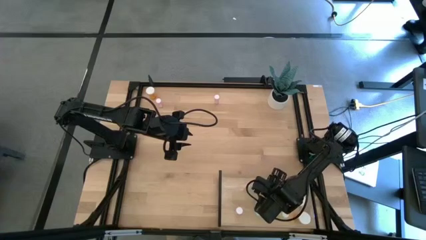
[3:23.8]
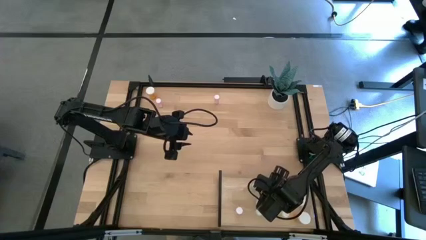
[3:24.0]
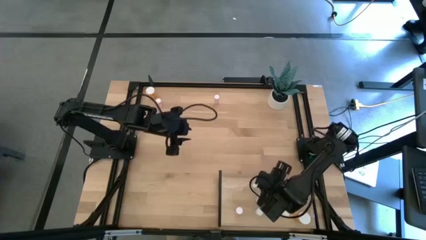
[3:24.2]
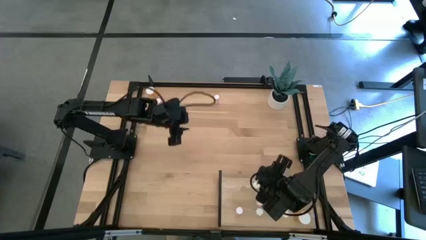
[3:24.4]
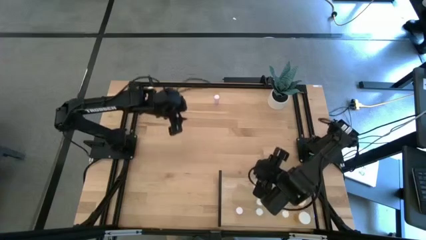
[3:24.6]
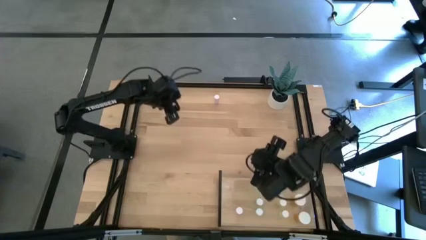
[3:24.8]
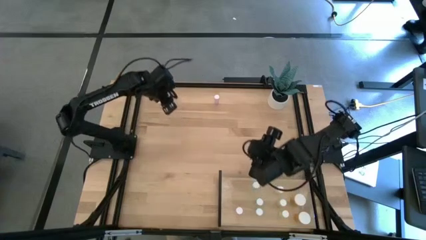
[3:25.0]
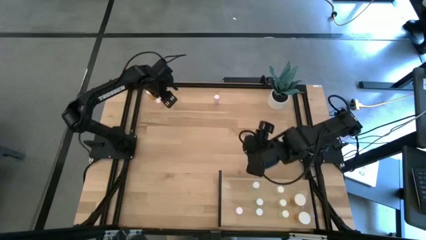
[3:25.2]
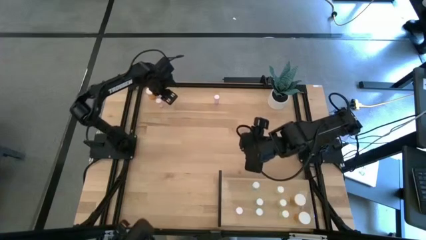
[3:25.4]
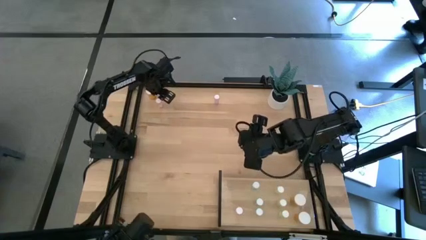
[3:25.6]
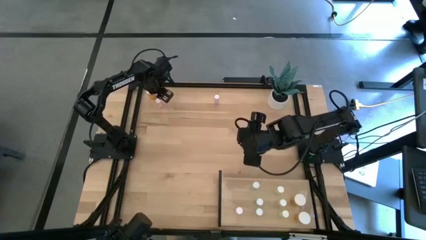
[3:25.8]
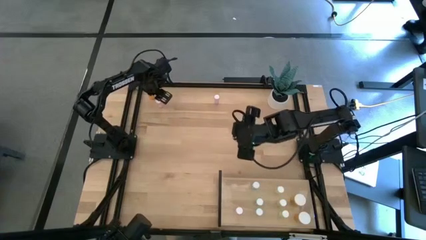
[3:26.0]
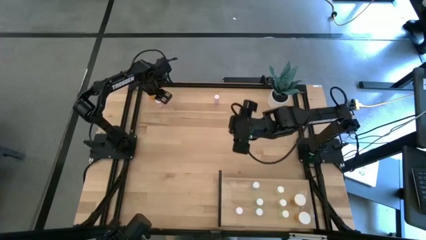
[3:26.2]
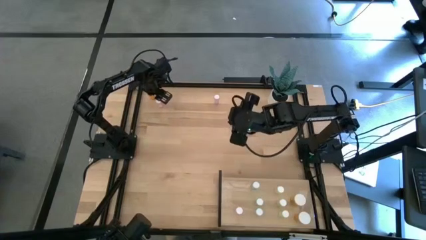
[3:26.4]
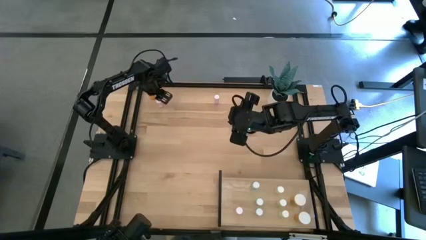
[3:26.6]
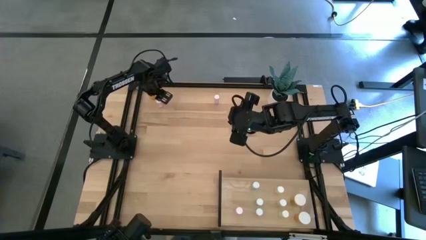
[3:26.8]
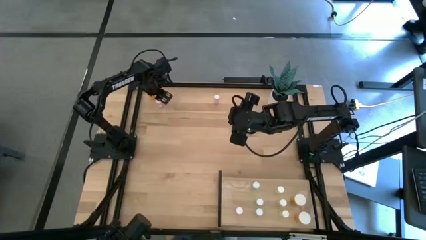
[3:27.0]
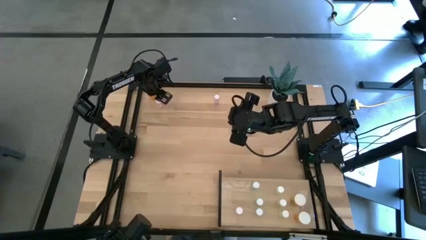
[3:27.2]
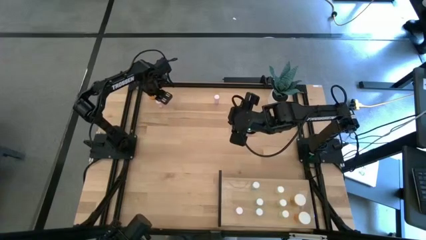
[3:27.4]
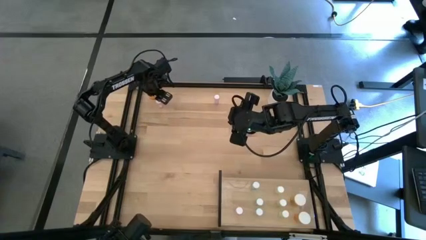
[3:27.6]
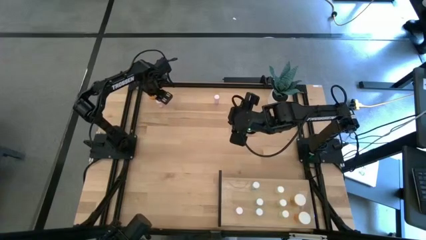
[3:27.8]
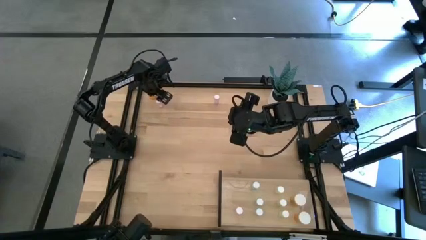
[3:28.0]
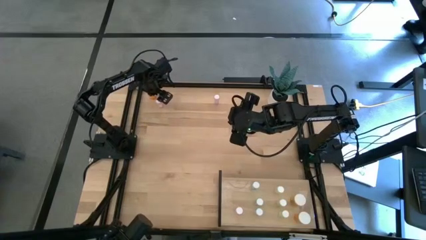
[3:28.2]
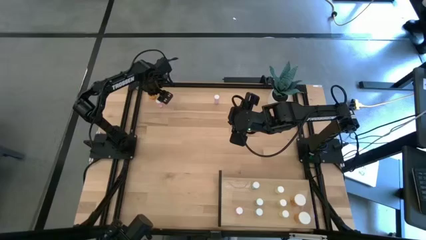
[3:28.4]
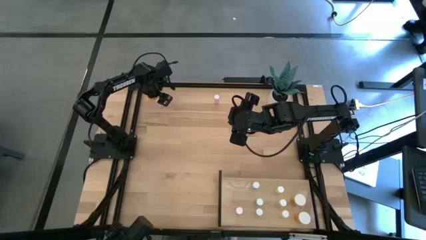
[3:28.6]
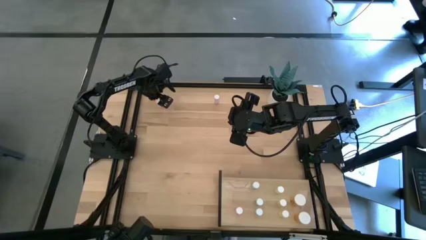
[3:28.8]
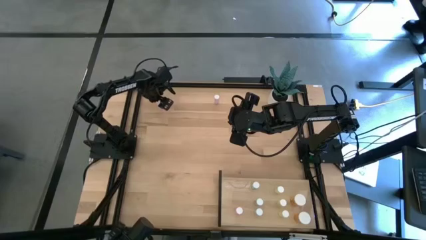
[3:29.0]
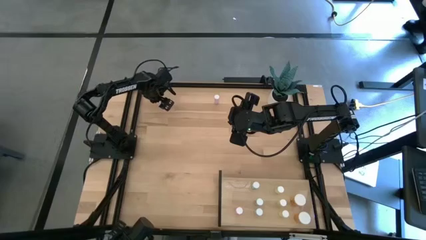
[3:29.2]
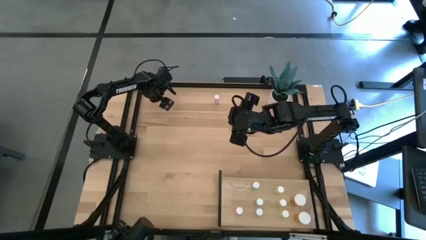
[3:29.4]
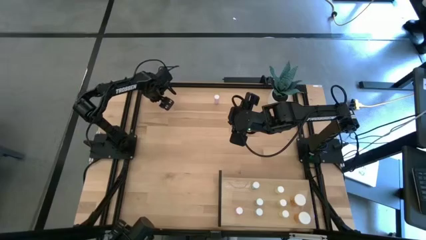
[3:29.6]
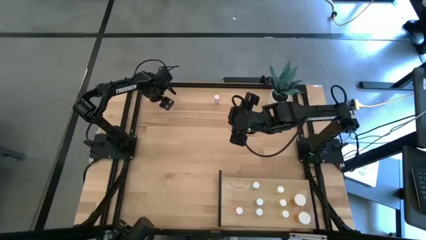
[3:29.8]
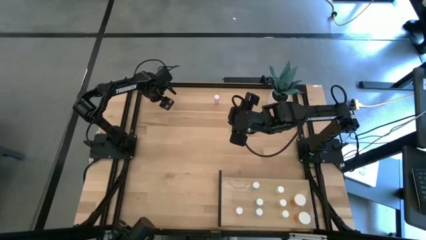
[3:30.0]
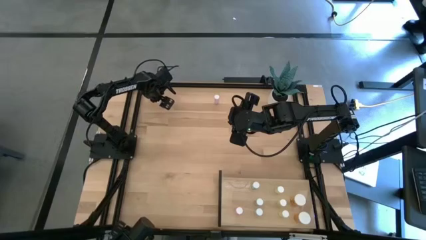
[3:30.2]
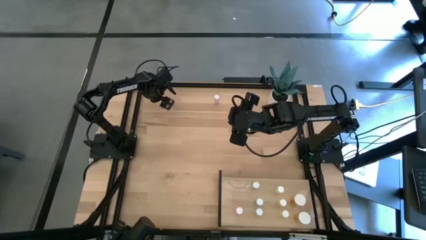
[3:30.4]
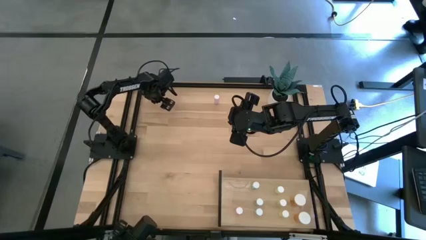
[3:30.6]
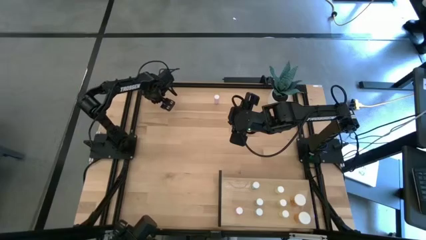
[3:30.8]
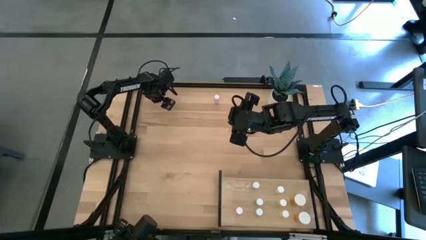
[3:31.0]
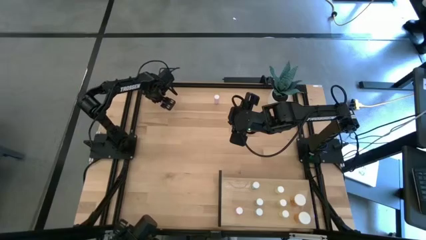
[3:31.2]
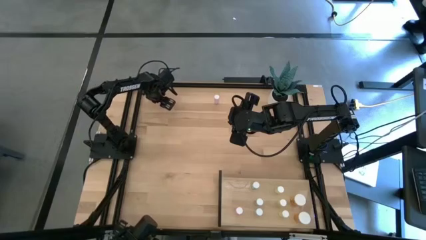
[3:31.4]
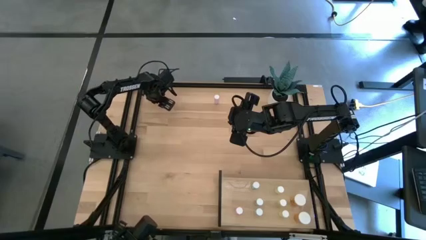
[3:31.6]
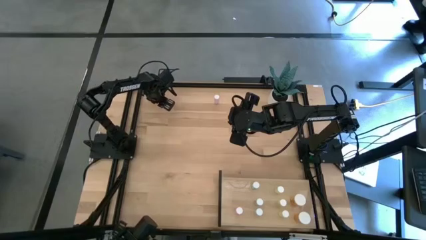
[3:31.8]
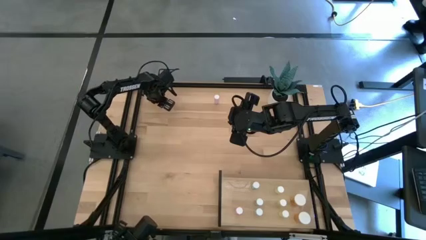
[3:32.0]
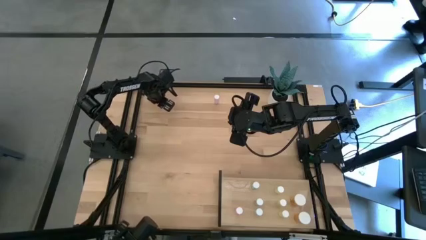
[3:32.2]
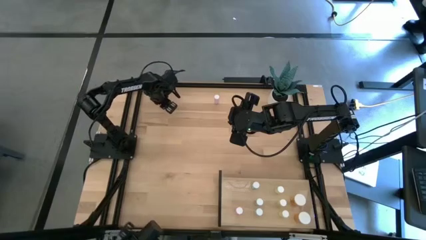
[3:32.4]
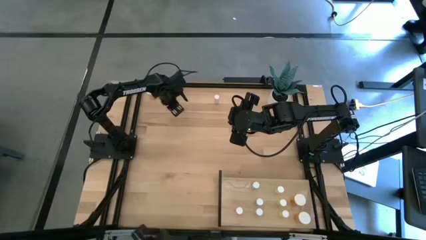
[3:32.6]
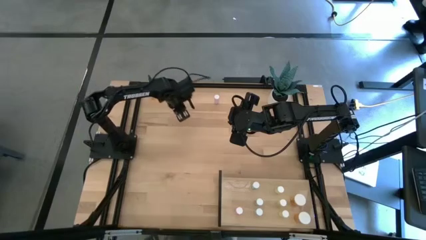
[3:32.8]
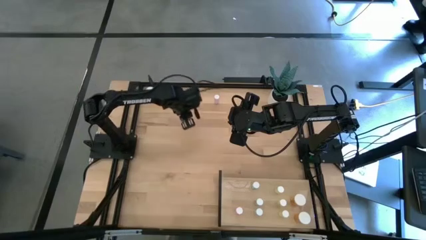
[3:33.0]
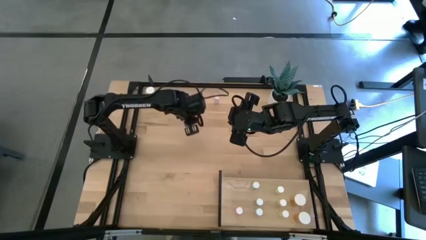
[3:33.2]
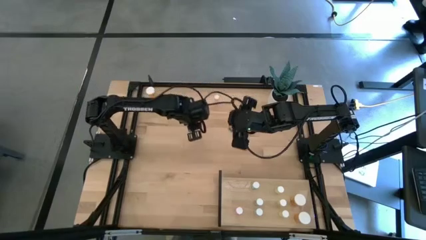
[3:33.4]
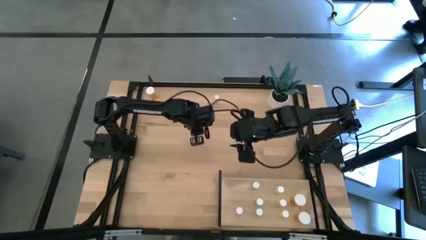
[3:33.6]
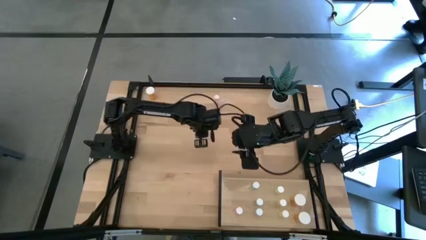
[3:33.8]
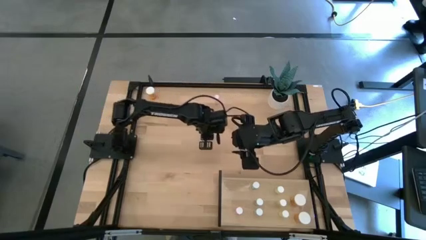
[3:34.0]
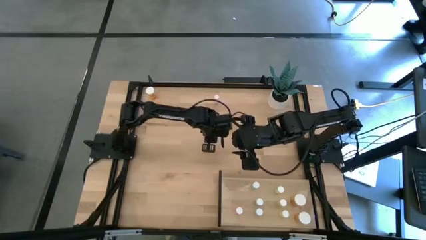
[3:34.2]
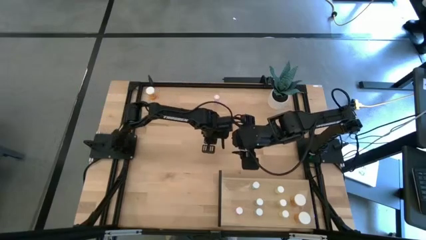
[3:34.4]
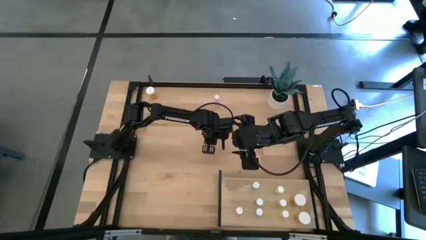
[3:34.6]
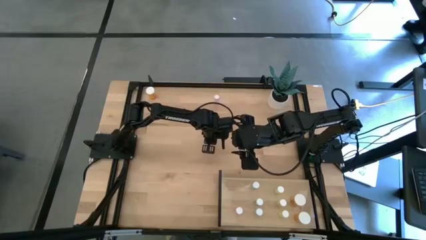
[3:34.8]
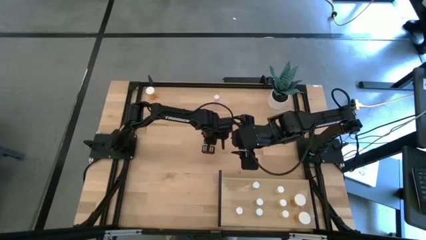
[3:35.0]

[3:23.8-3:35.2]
Task: Pick and place medicine bottles onto shelf by color
Put the left pink pill bottle on the shelf aligned with the other pink pill bottle

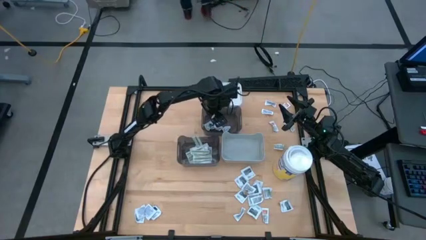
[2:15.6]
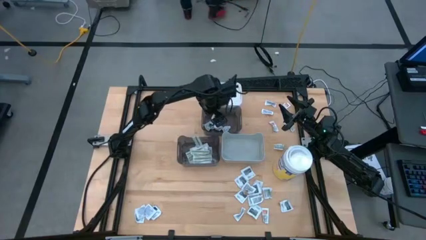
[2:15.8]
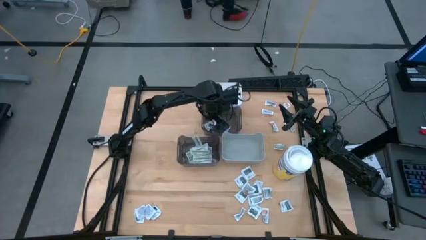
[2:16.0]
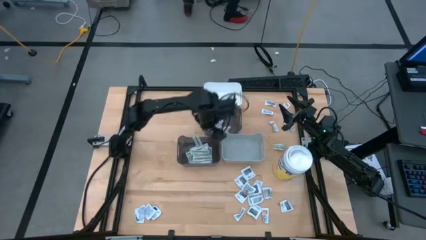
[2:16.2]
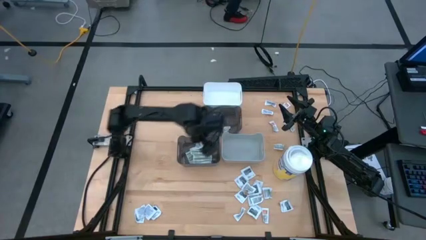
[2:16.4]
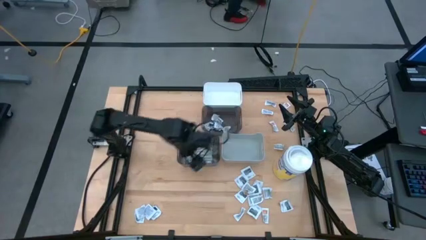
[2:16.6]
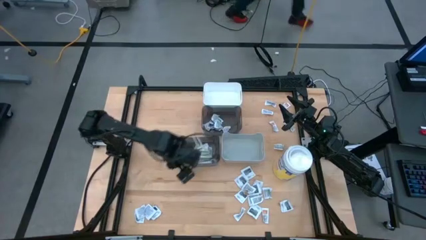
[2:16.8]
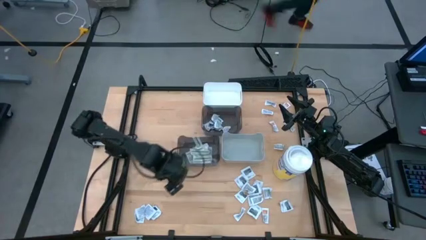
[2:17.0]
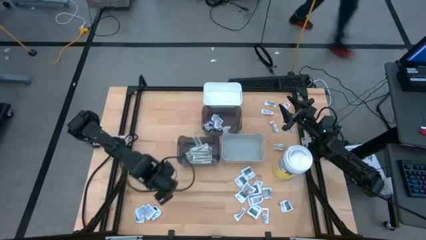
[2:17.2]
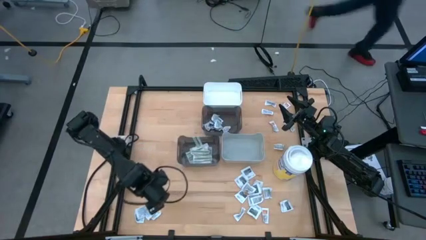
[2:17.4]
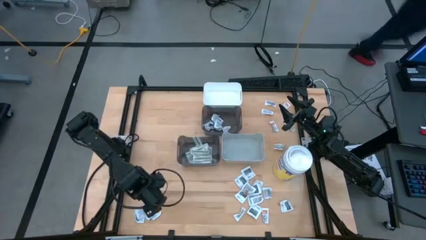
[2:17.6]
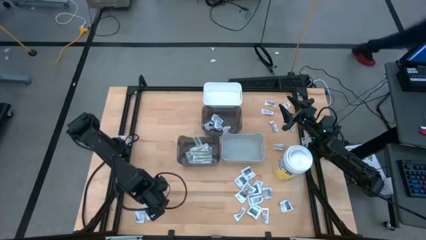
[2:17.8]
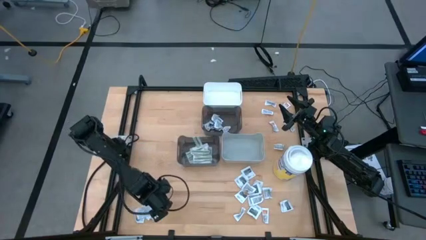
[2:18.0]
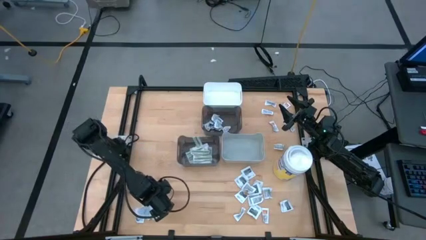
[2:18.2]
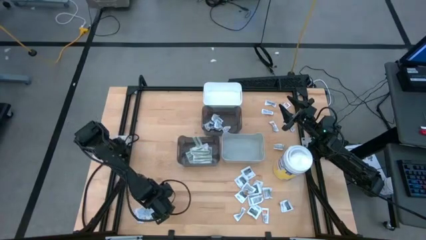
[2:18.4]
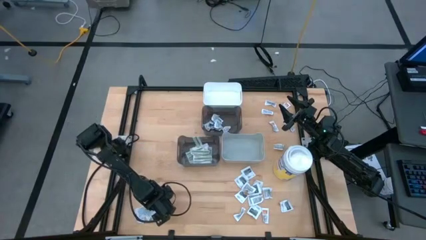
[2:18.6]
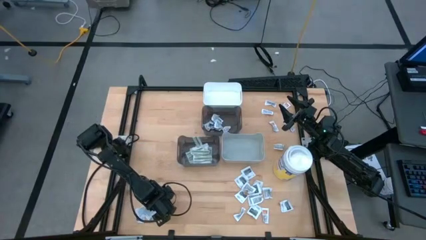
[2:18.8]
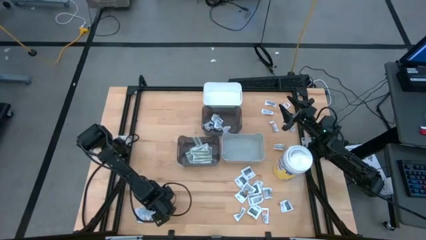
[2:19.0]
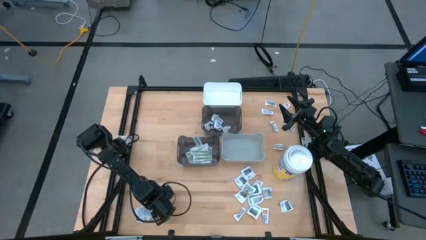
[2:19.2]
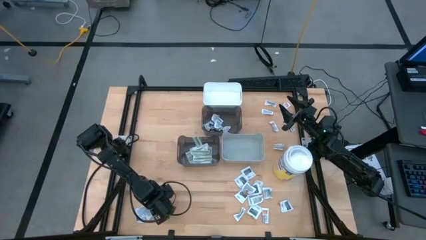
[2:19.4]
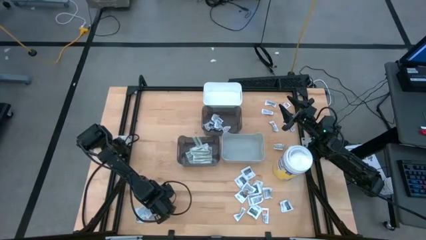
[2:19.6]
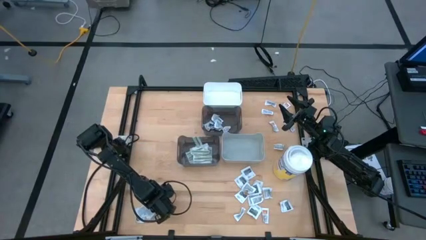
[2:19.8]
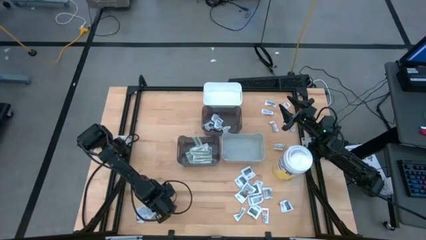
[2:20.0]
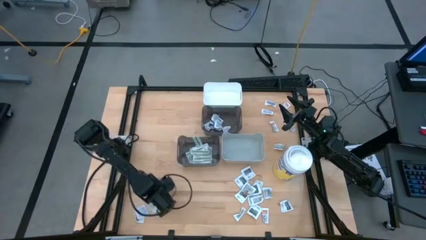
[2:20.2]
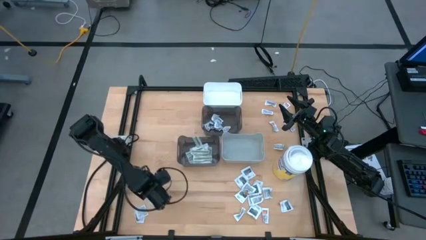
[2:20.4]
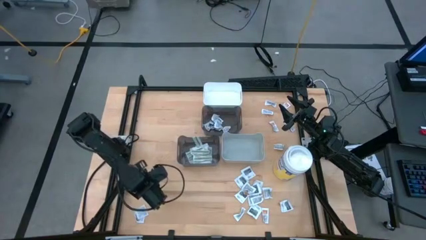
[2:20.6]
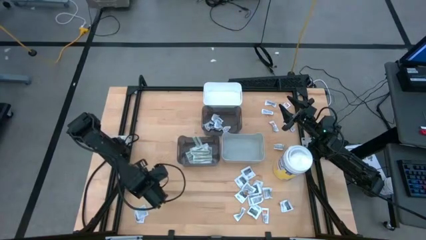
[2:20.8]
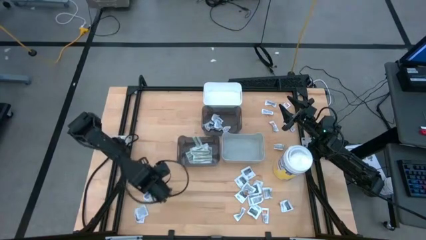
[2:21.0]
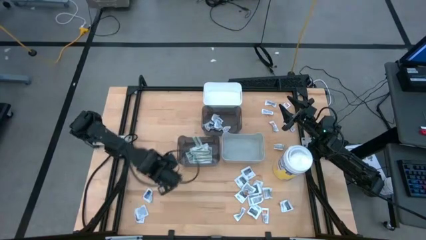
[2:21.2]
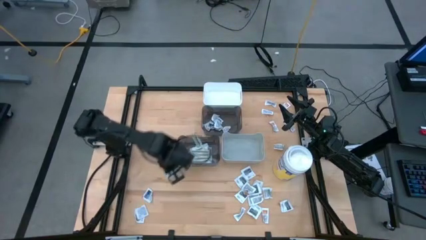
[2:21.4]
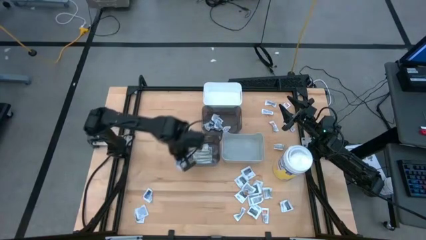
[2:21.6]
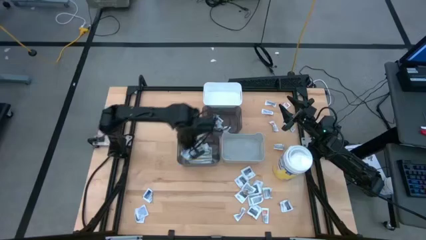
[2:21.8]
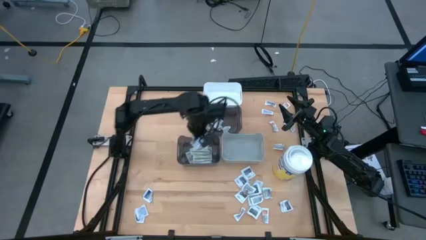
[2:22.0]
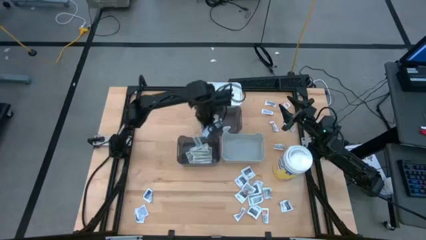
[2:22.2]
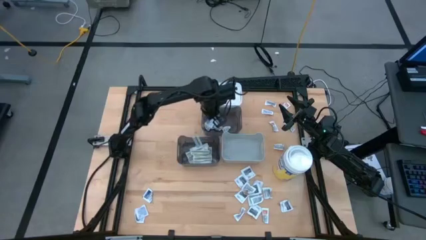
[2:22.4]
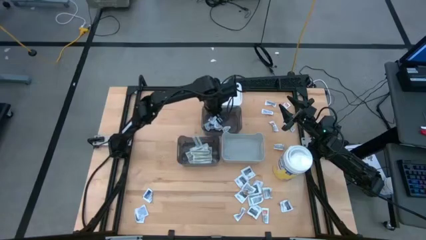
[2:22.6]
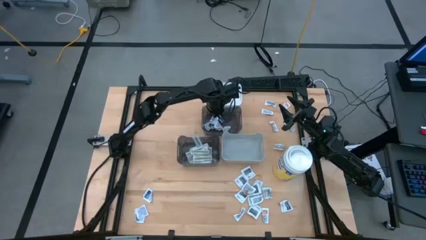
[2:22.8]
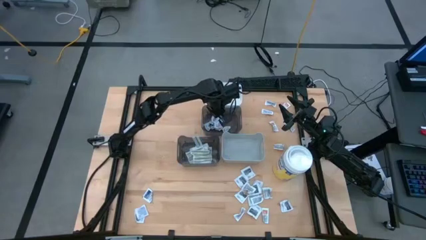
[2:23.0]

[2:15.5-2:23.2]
Task: Pick & Place First Aid Supplies
Put the white alcohol pad into the top black bin
